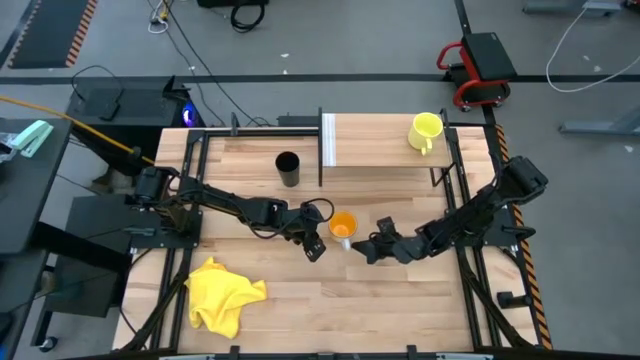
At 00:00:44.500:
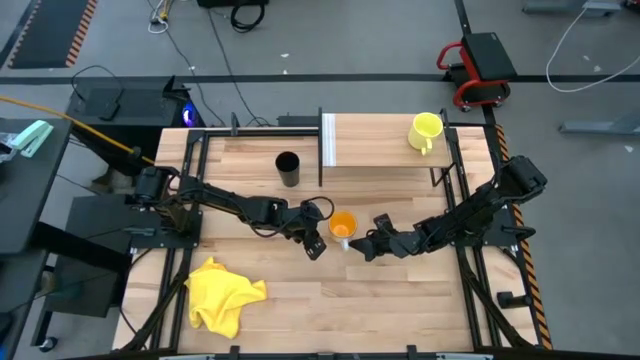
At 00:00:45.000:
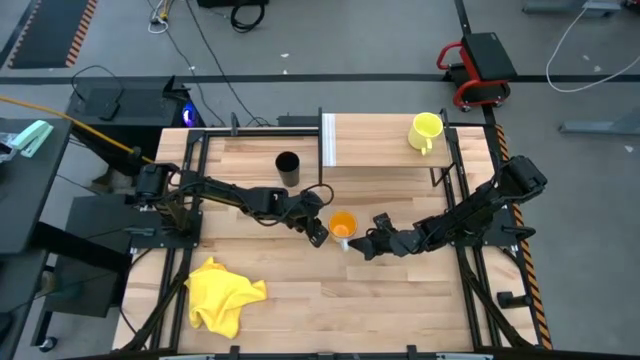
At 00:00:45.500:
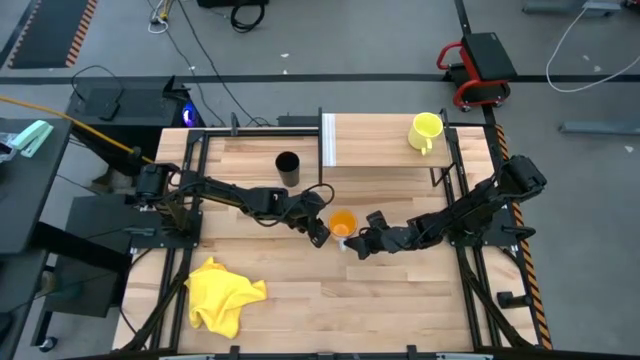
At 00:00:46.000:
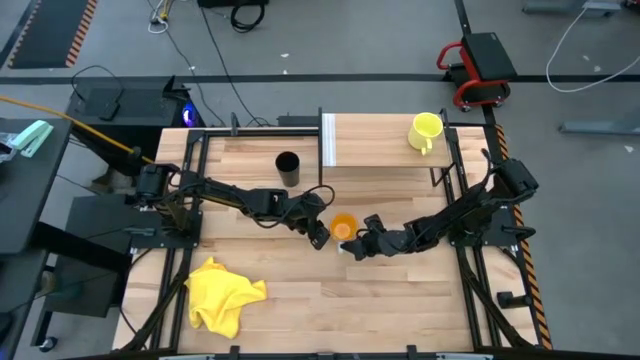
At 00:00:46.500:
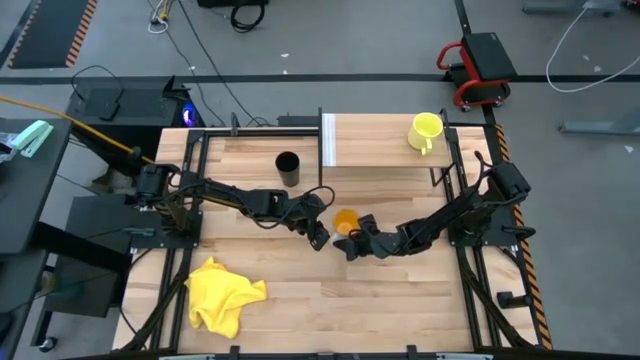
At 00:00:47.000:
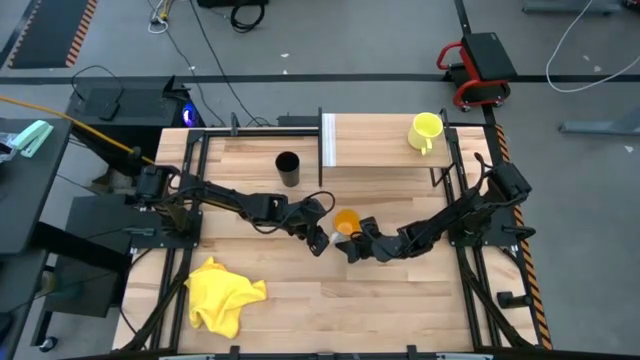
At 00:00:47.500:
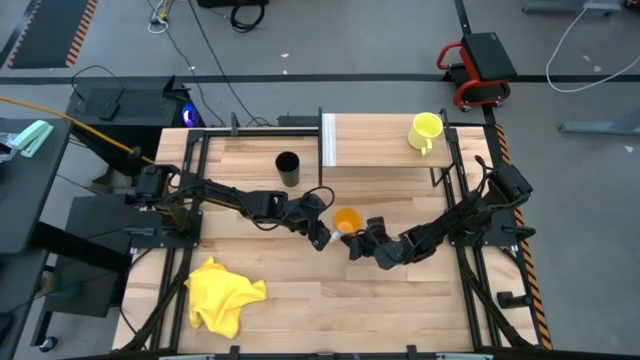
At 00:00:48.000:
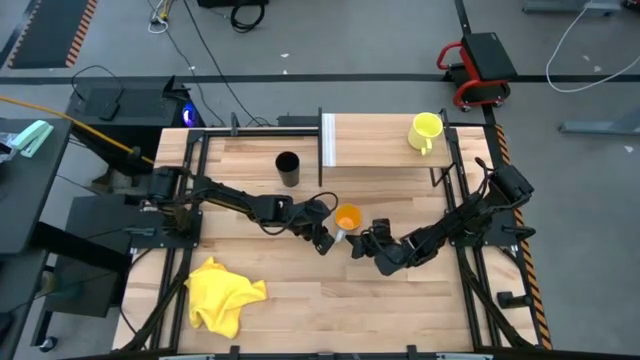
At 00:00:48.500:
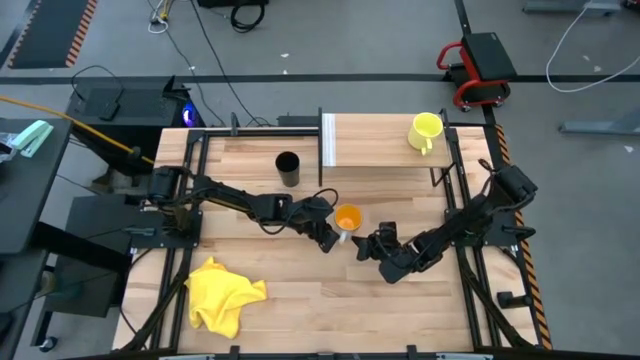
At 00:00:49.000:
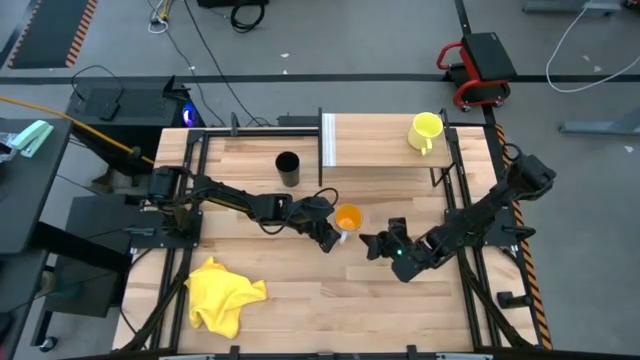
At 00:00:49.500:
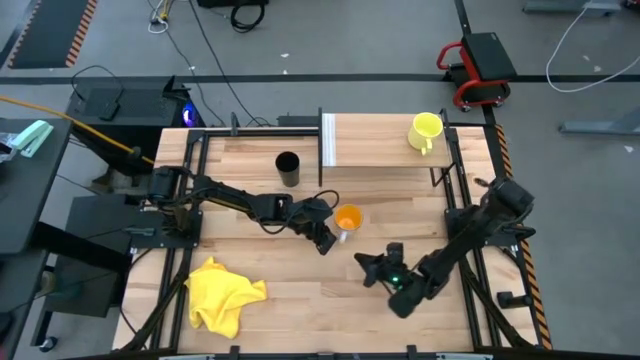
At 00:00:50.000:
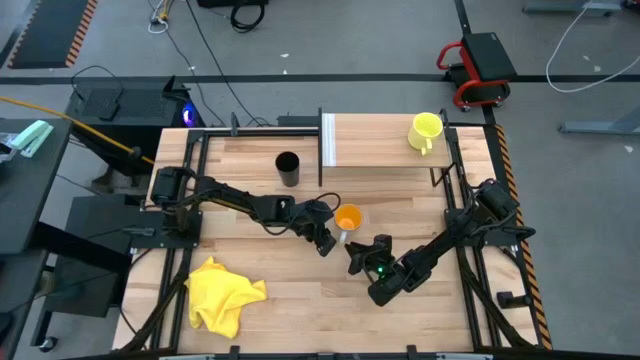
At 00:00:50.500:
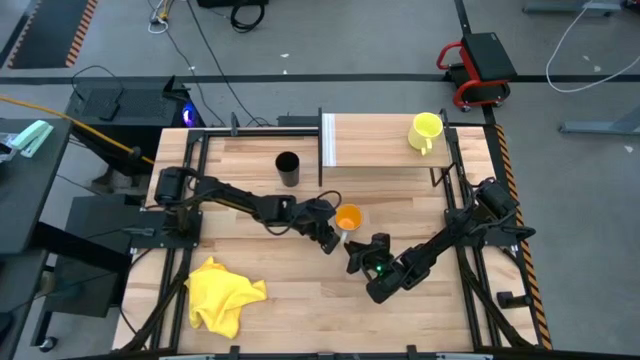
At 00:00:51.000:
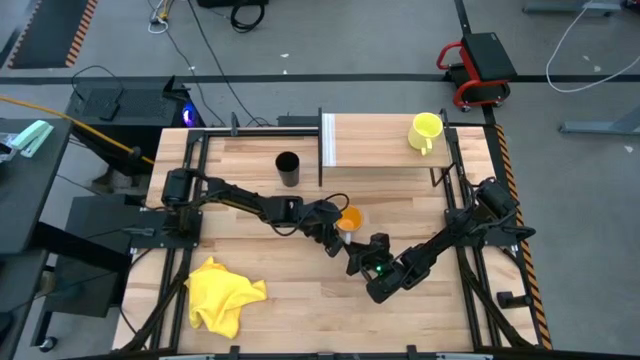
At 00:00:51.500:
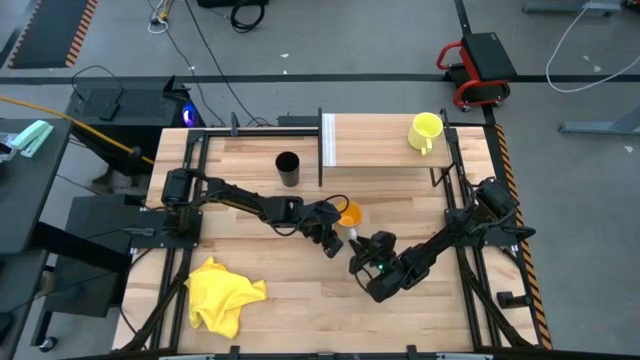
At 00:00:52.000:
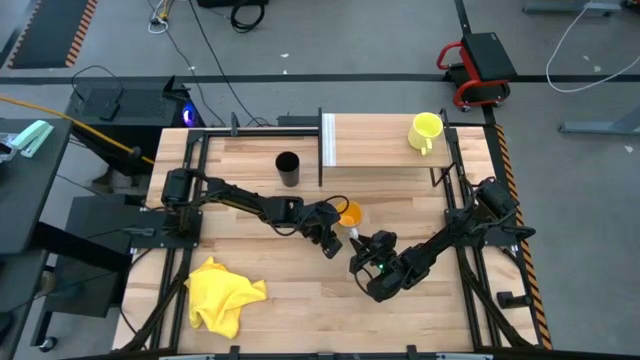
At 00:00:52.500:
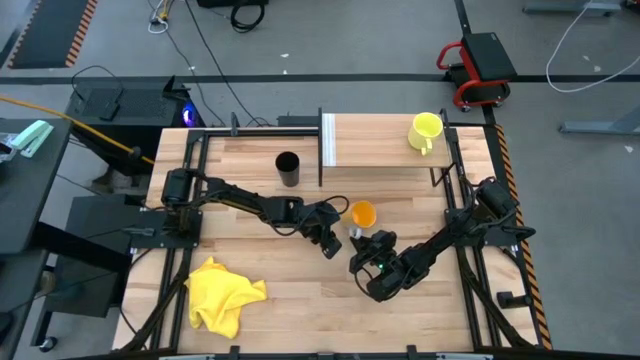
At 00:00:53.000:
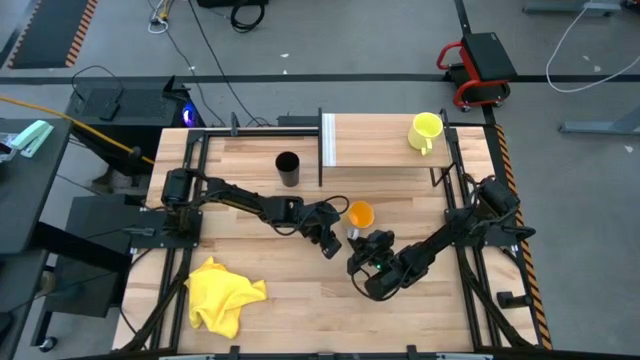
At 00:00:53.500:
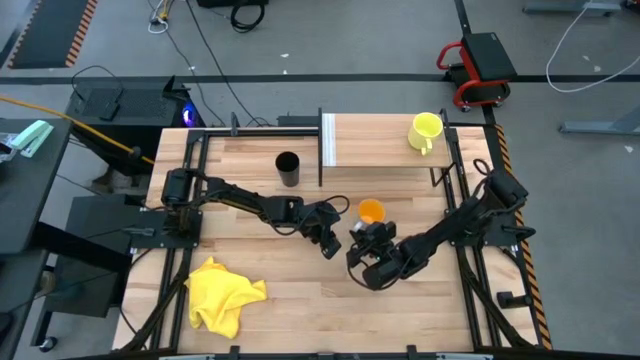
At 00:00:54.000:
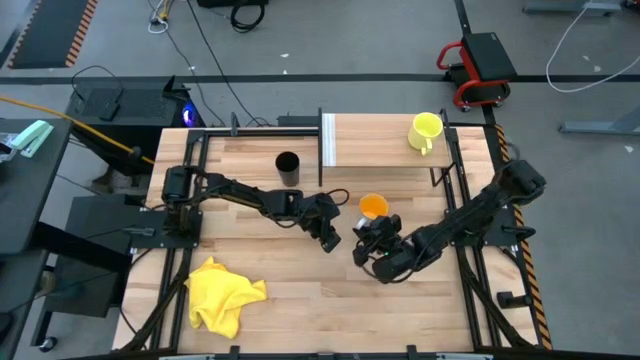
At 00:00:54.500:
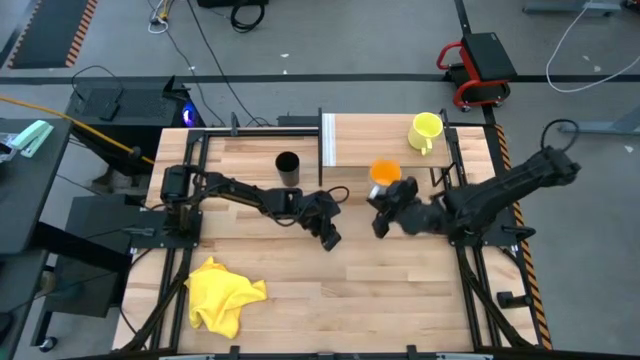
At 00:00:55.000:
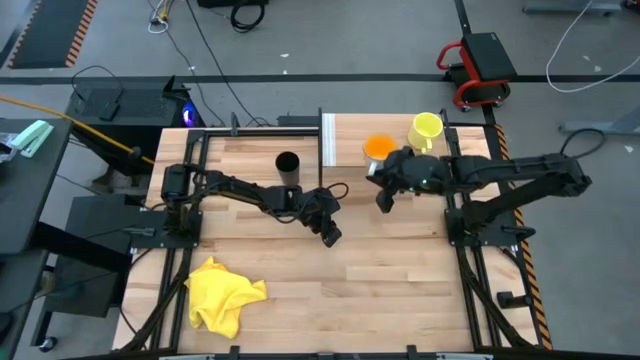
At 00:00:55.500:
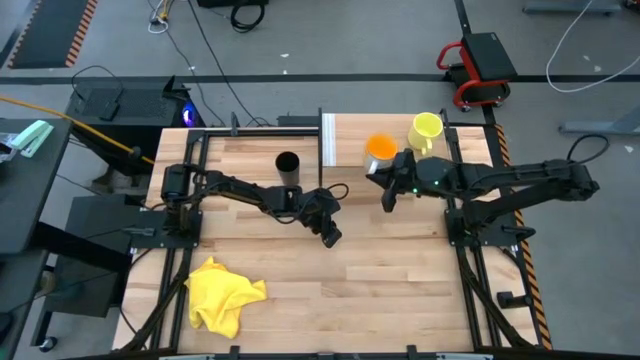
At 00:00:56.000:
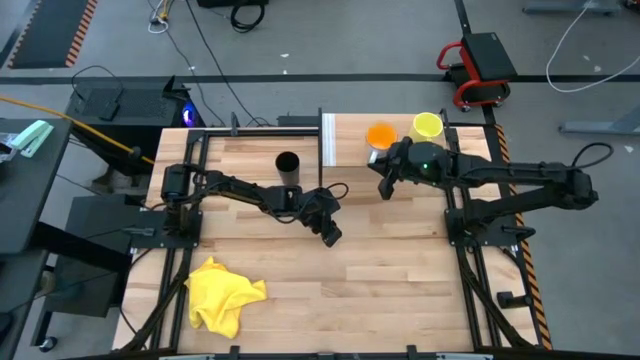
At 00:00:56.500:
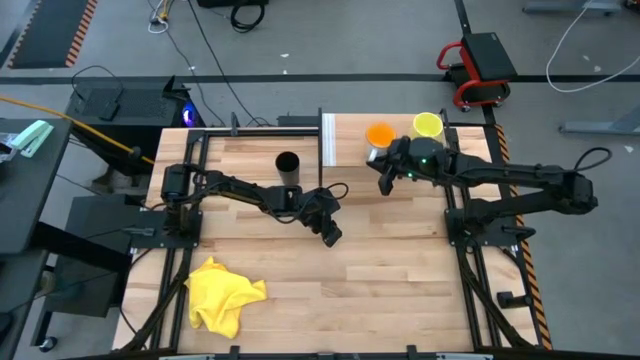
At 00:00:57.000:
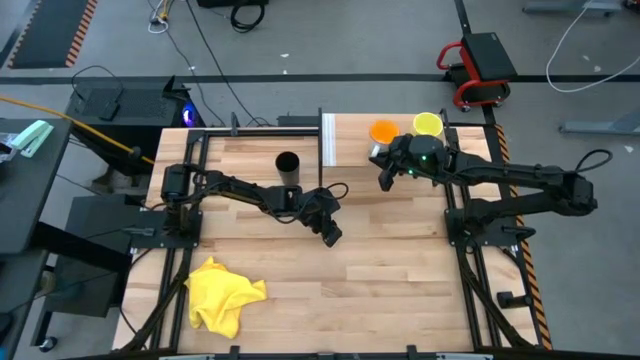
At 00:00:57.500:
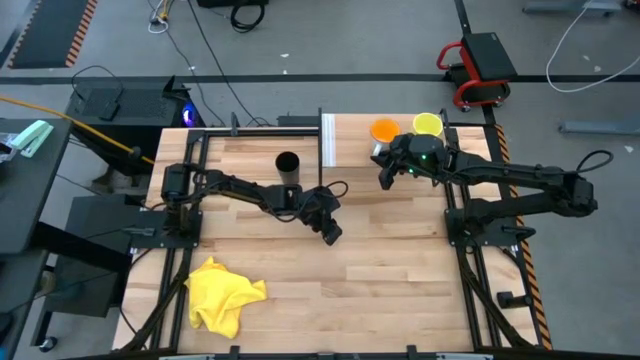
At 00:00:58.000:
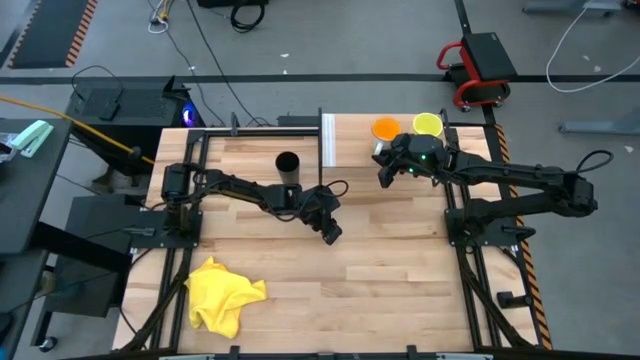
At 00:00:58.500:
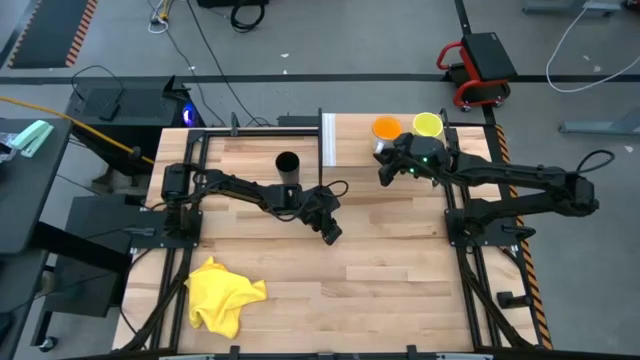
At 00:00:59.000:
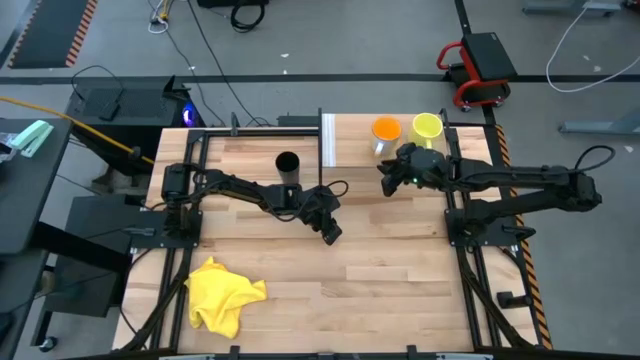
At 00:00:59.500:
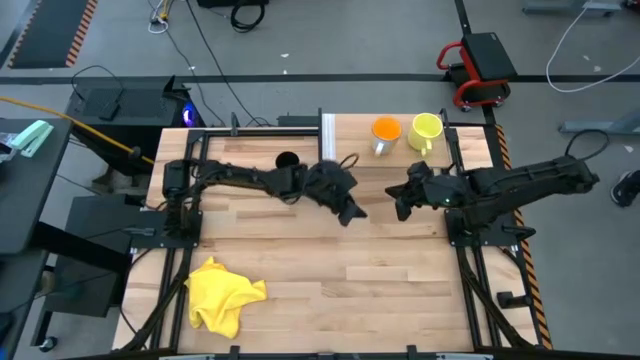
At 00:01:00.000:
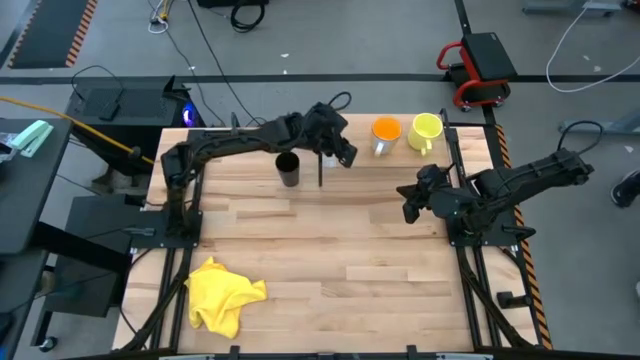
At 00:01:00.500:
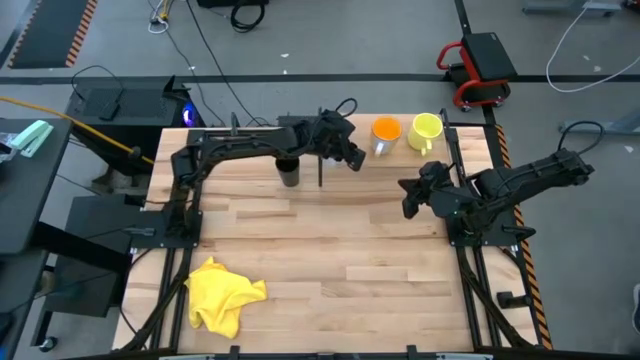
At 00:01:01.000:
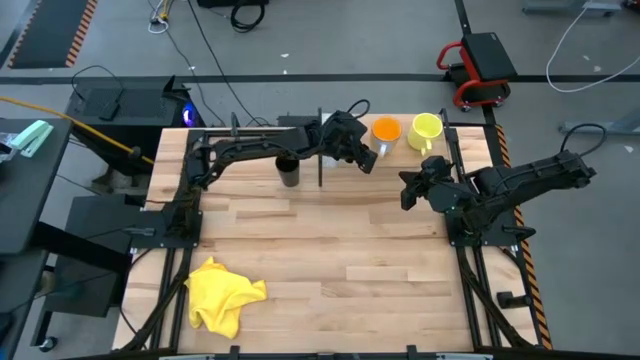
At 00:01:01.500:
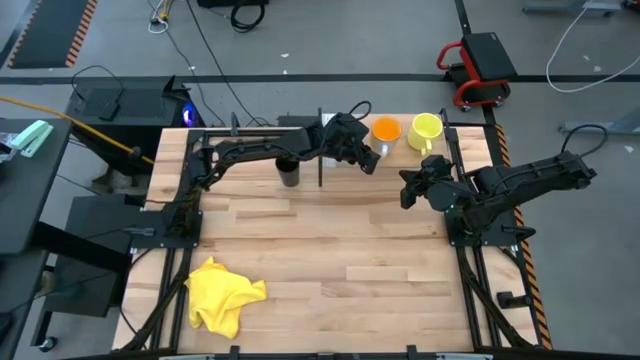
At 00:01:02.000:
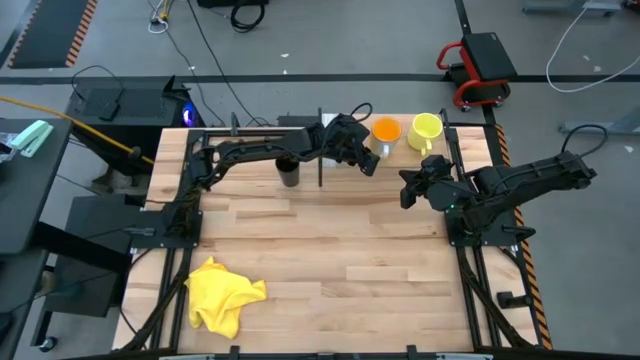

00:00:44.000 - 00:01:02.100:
Task: Stack small to large cups/mugs on shelf
Put the orange mug on the shelf

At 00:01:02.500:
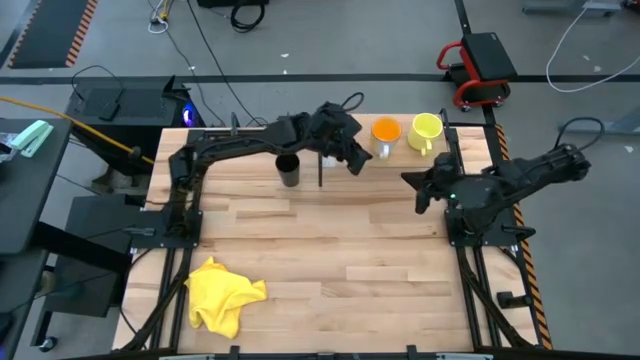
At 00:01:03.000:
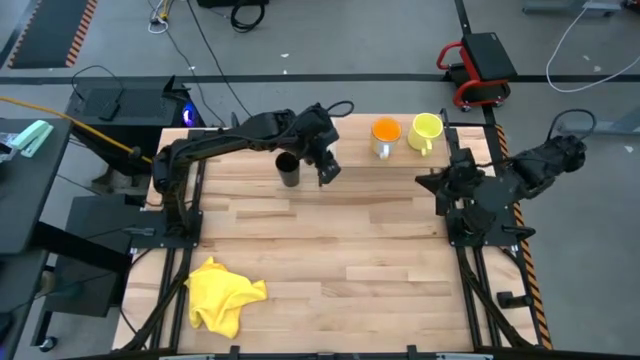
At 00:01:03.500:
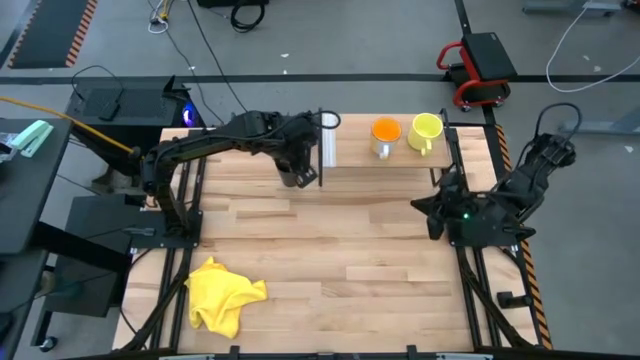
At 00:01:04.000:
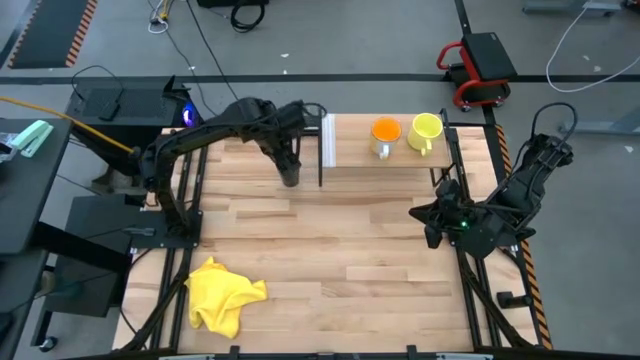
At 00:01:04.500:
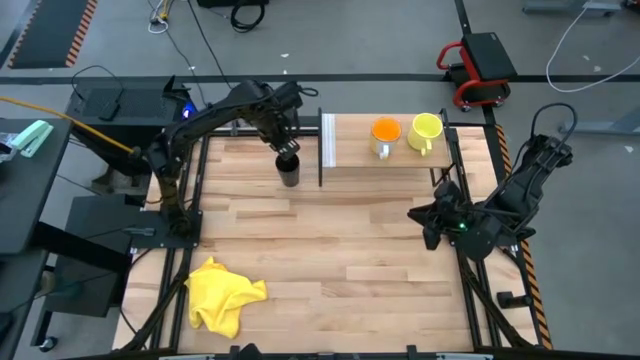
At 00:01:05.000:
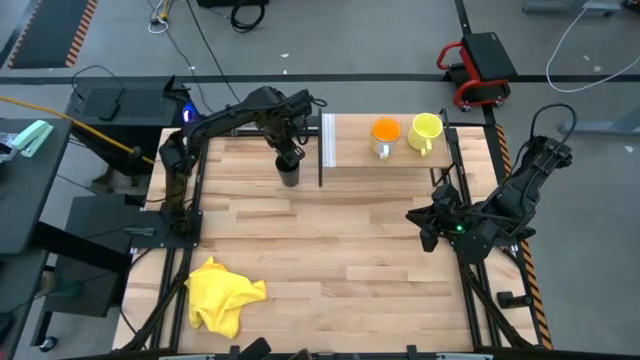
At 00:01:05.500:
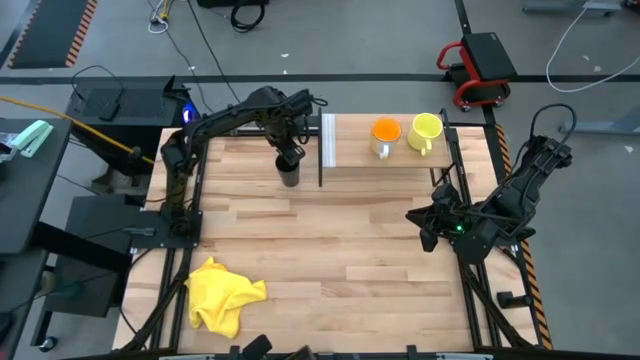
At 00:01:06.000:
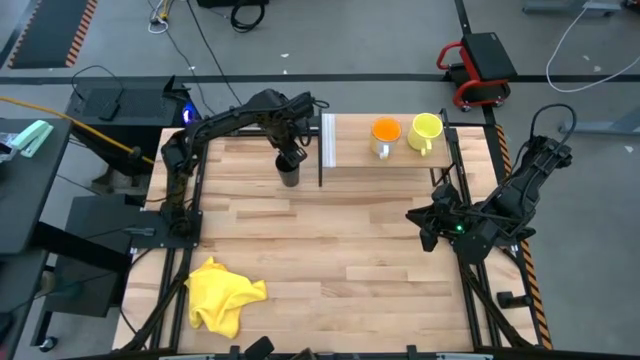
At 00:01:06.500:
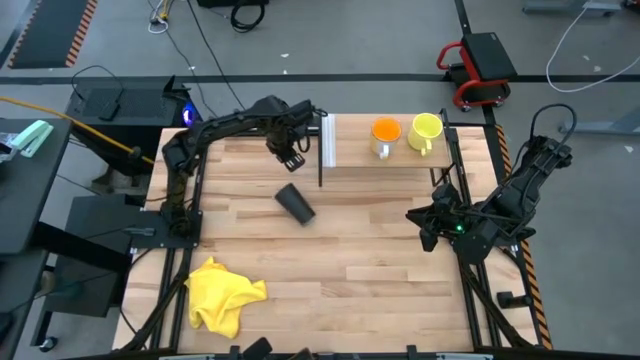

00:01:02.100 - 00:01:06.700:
Put the black cup on the shelf
